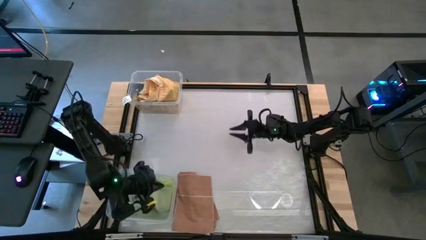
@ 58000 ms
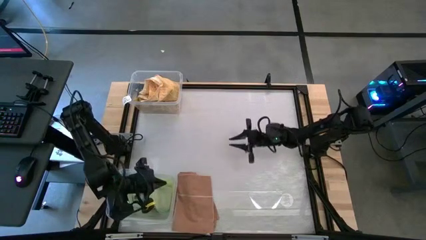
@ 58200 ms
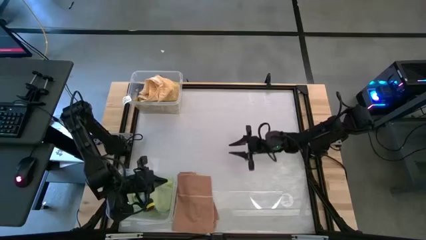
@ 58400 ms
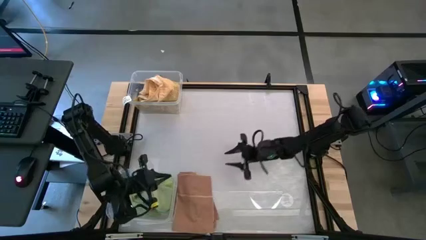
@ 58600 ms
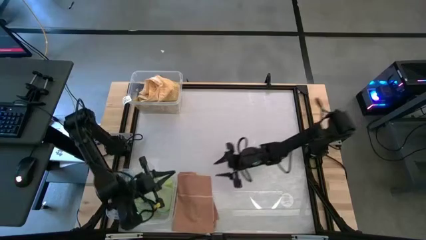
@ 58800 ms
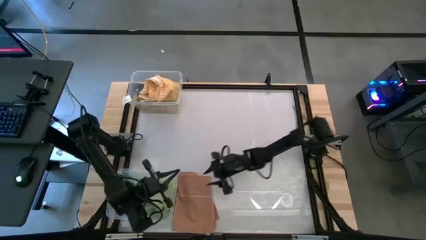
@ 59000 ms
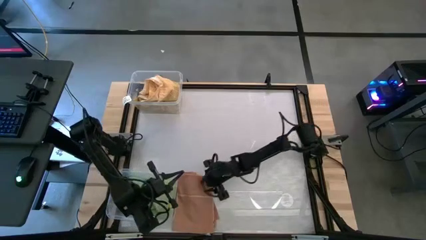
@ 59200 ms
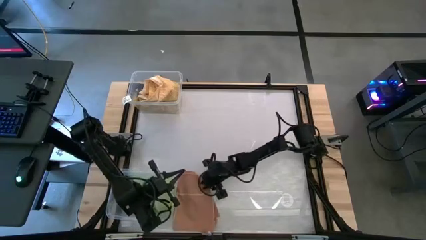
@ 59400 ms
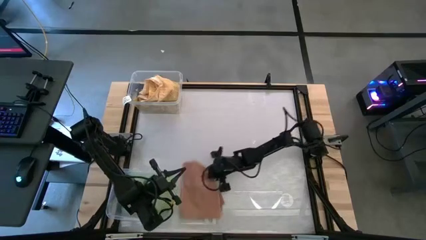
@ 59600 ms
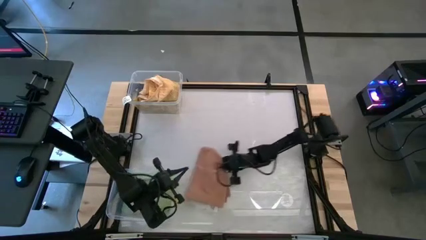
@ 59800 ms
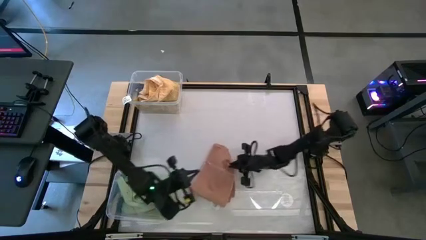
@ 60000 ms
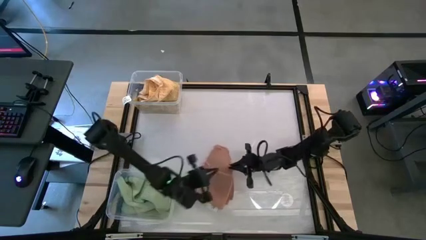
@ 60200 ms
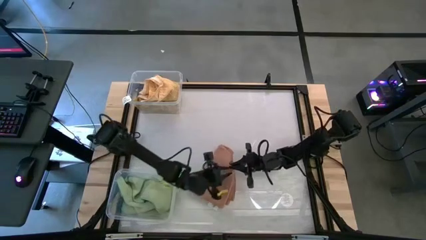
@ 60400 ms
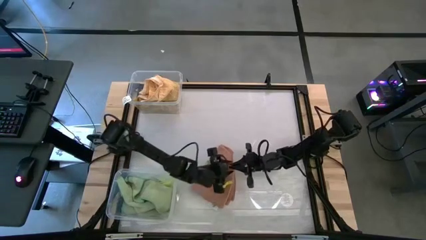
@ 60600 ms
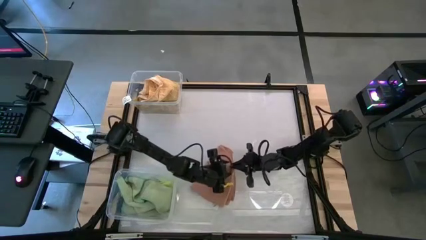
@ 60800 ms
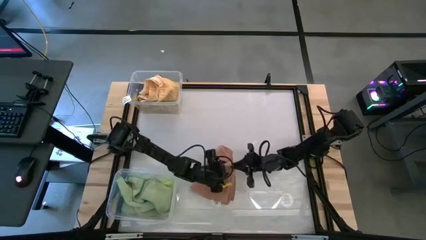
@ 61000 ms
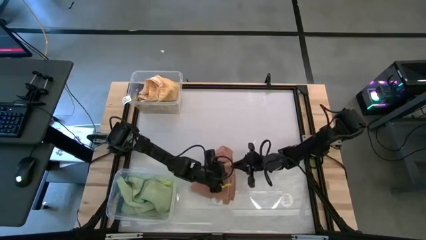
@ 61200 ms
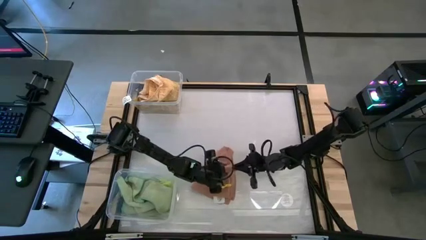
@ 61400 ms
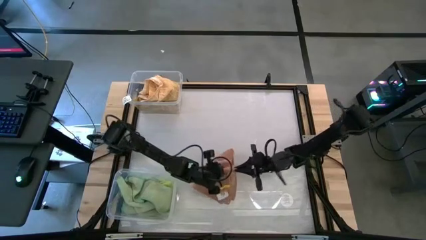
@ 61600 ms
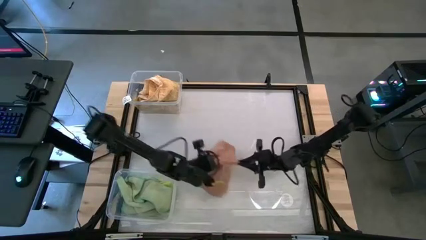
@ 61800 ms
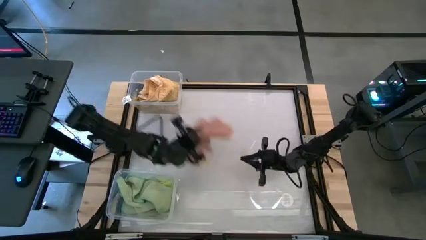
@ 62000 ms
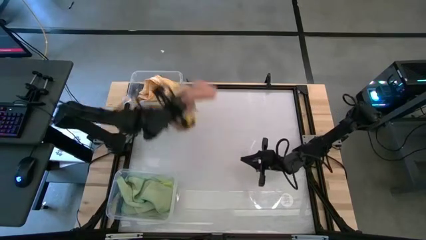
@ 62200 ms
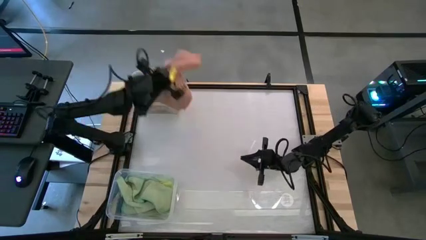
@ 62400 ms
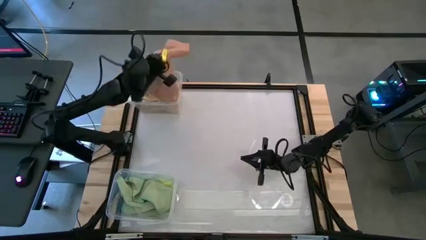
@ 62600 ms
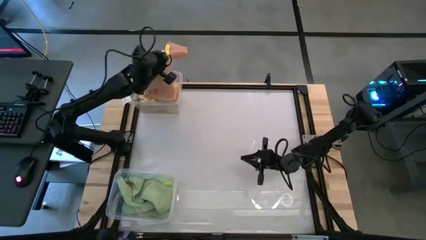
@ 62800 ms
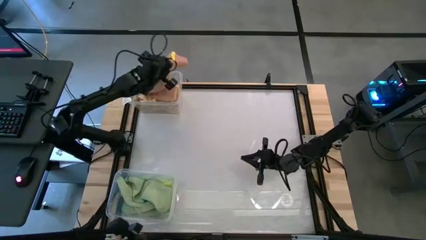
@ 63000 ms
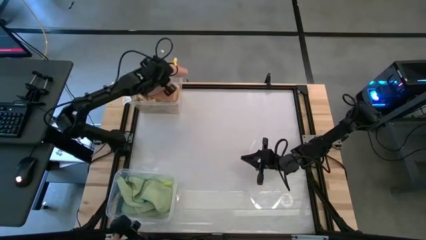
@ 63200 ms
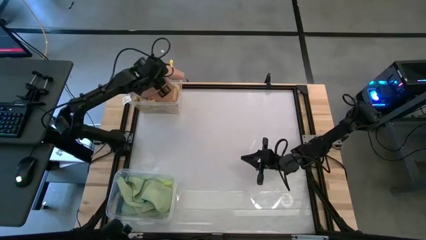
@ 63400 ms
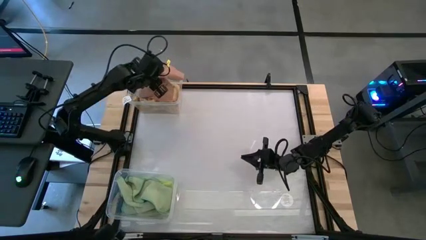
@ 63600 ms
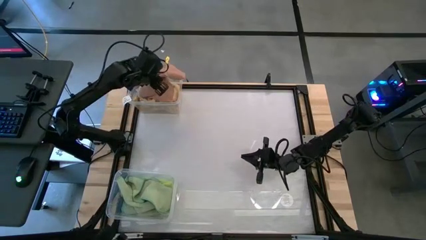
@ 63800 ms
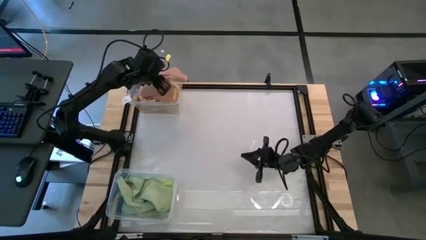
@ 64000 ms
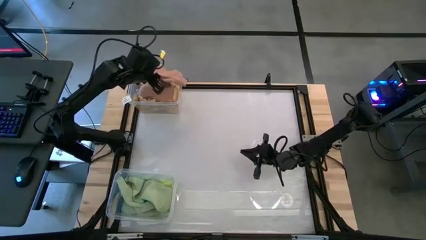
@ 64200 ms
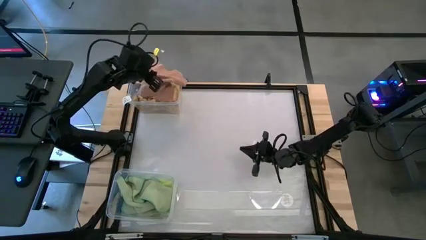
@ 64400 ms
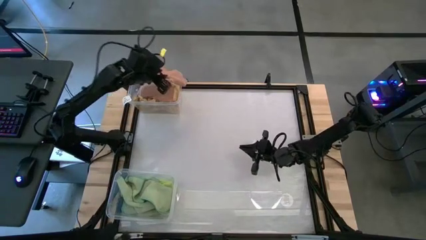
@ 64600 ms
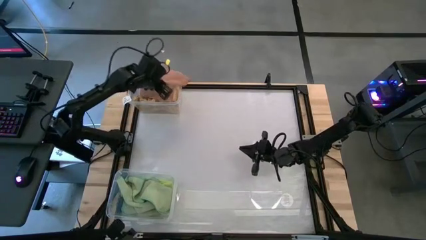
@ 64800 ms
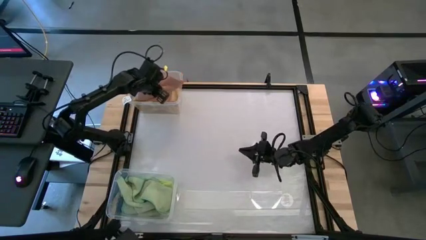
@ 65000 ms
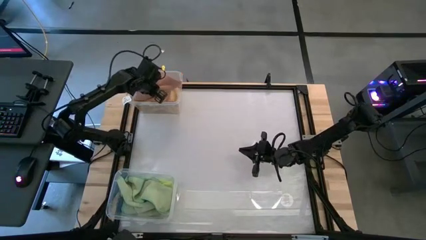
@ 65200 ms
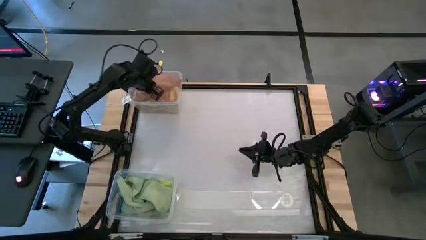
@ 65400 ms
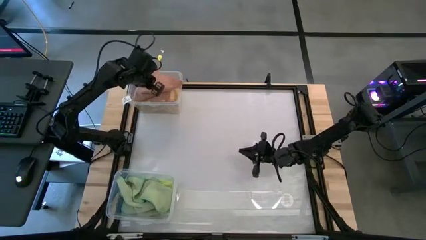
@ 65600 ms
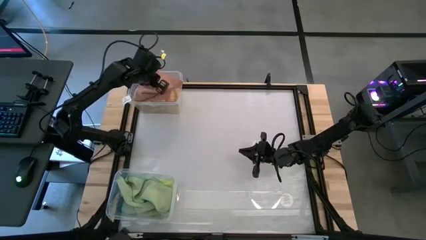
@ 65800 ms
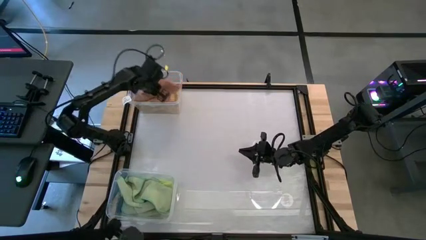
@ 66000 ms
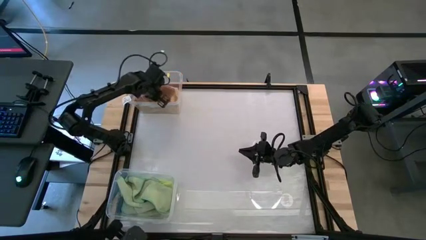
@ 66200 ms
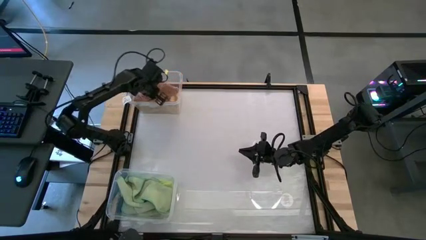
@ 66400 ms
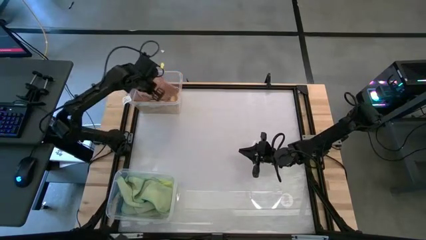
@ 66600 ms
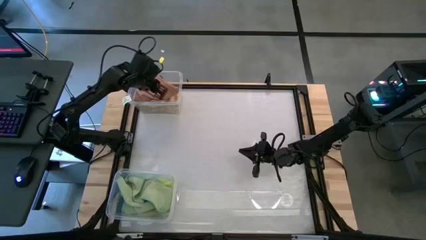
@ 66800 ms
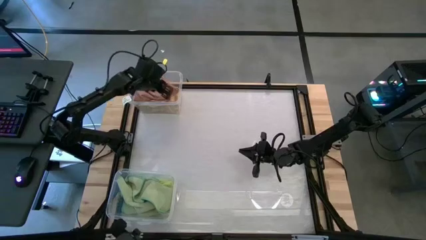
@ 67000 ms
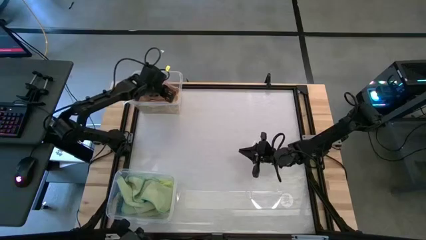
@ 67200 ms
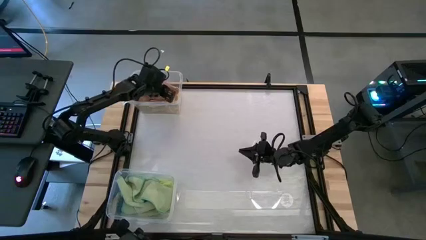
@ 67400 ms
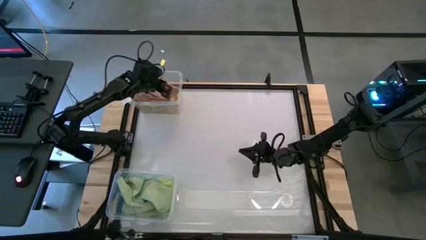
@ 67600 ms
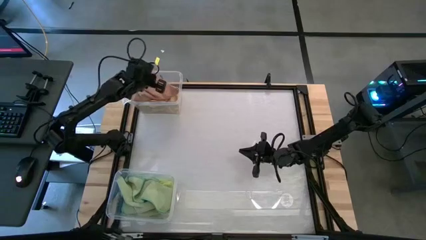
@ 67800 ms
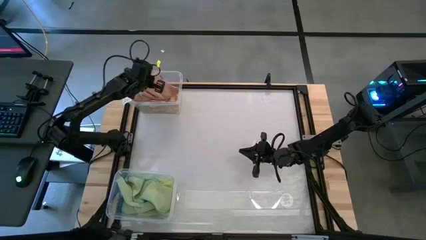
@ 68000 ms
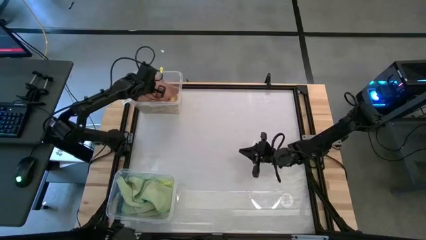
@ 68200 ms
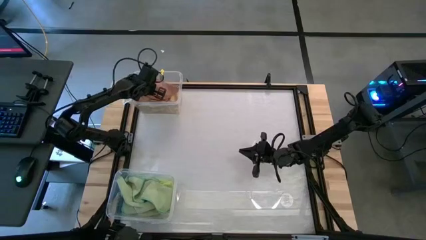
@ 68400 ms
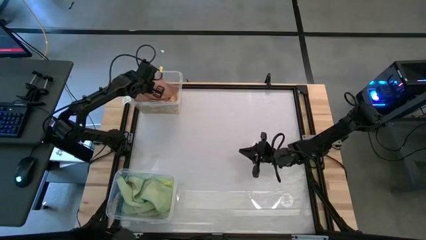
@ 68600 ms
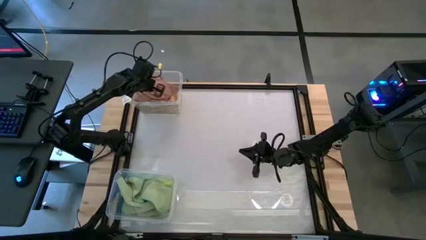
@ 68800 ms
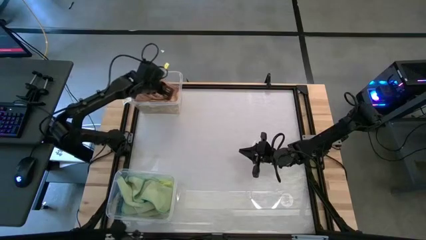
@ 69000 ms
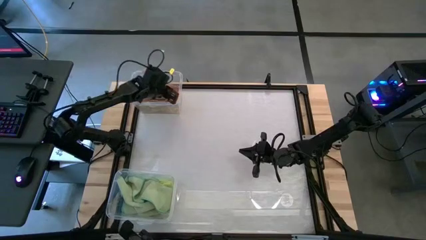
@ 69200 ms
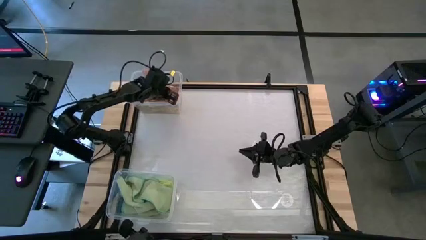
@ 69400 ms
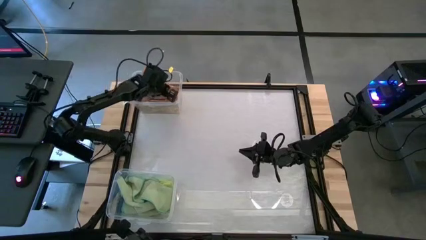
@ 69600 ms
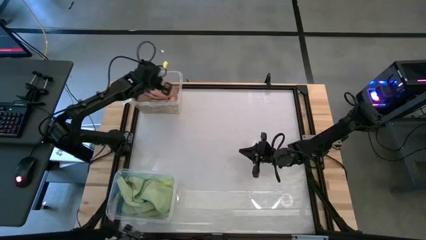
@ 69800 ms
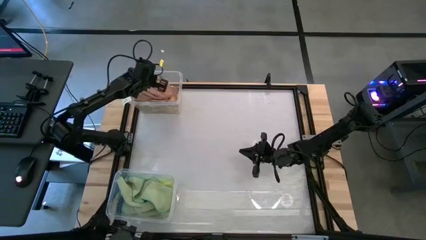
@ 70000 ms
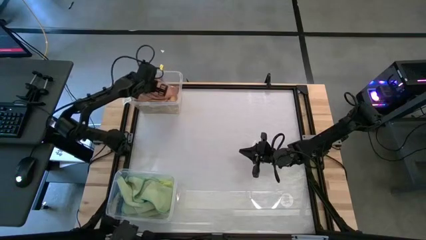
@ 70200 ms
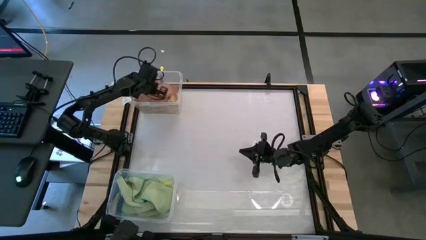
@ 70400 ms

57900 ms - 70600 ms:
Task: Sort towels by color in basket
Put the dark orange towel into the top transparent bin

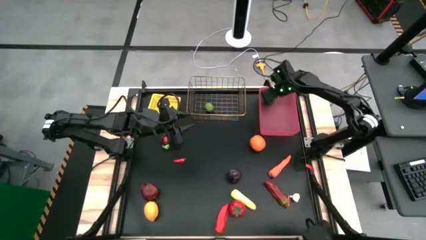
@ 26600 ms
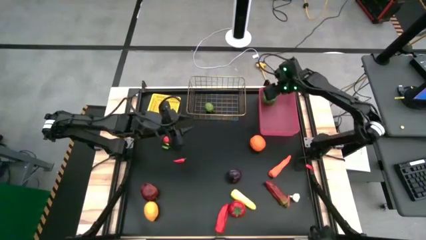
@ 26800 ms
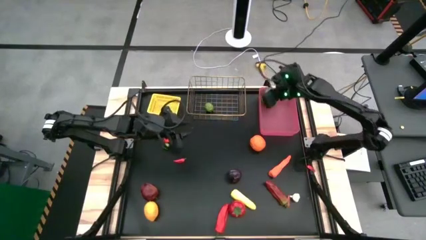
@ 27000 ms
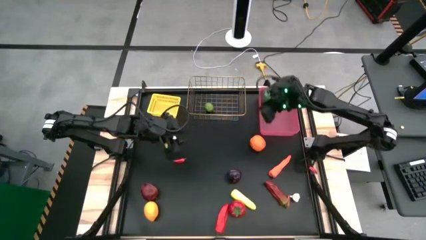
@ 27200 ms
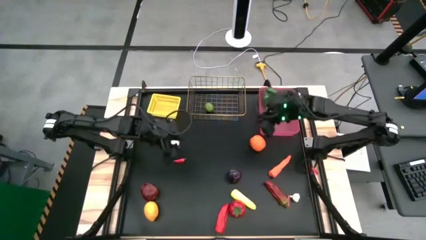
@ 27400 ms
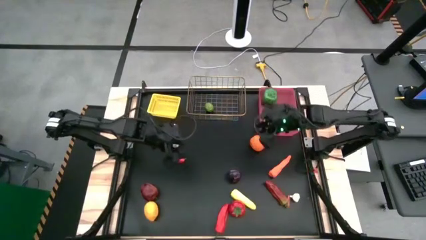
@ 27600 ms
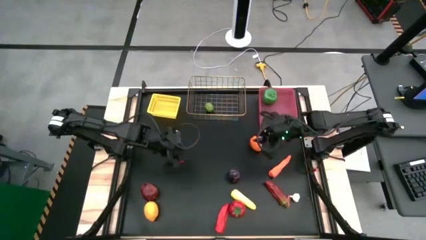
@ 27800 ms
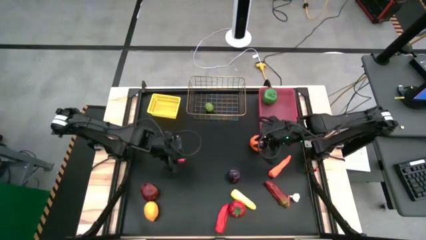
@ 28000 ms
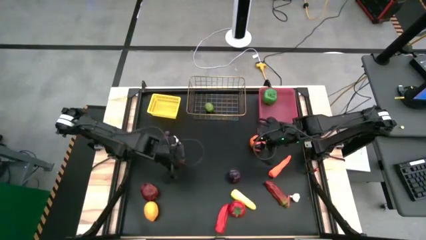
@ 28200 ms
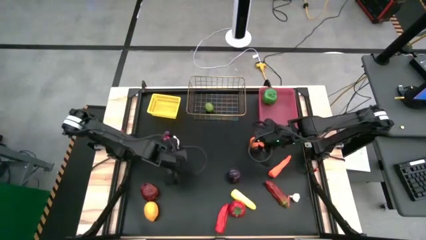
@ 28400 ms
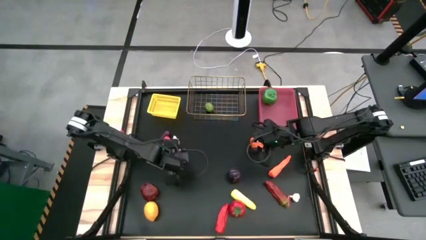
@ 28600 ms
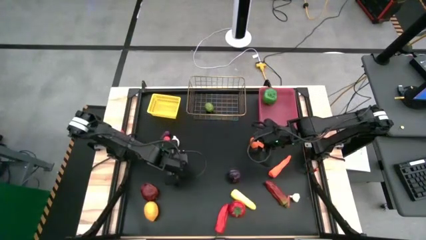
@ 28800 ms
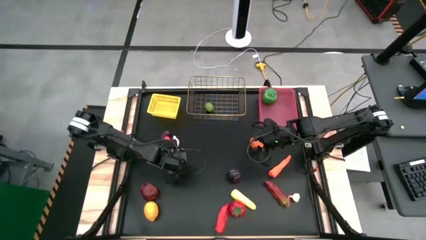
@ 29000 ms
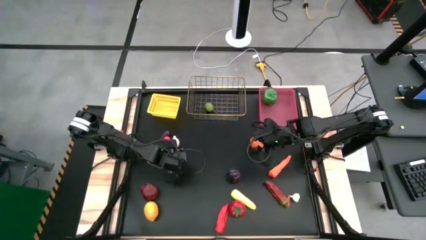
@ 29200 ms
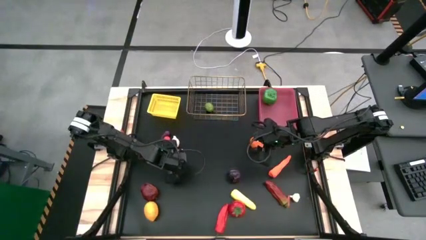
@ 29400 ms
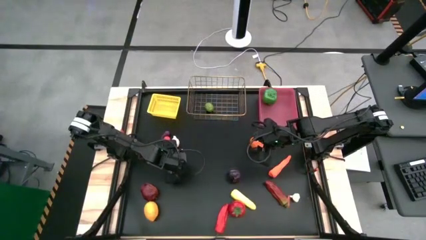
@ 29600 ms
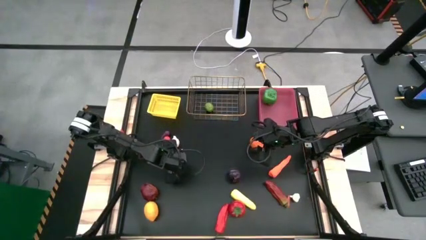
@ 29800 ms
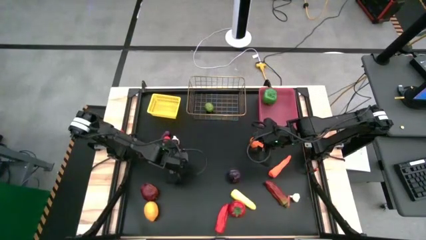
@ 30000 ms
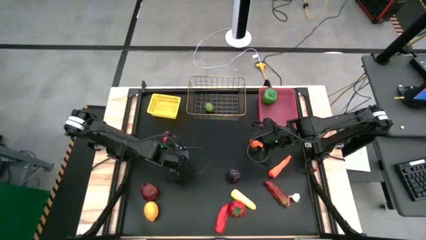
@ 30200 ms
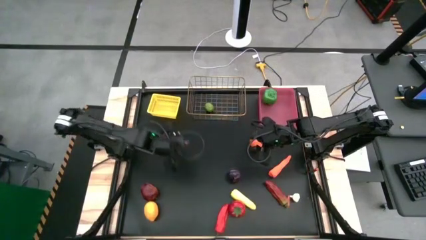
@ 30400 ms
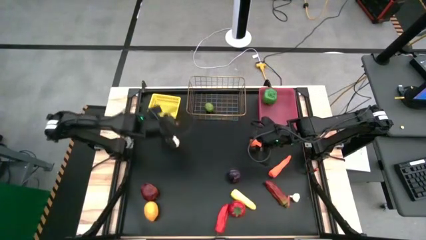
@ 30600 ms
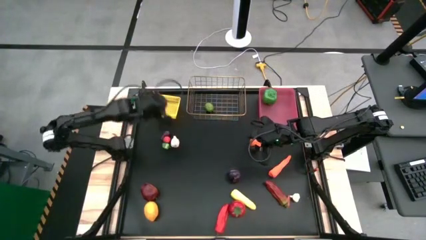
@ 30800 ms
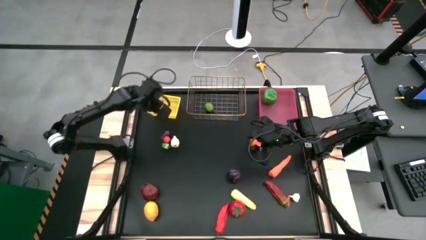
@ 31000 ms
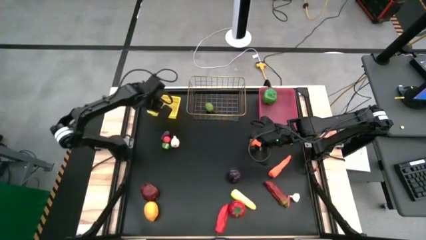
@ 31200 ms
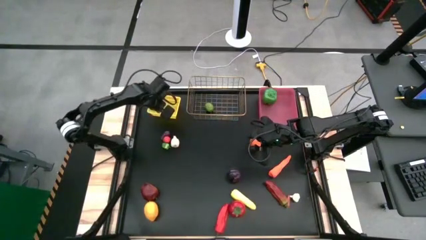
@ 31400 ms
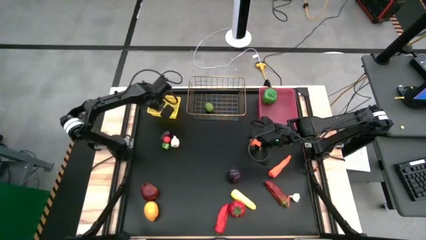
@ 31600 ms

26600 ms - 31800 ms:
Task: Sort produce into baskets
Put the small red chili pepper into the yellow bin
